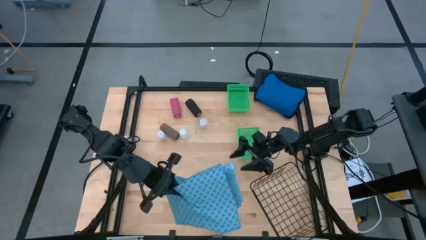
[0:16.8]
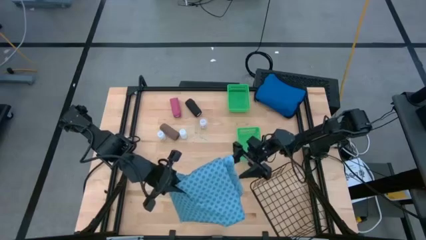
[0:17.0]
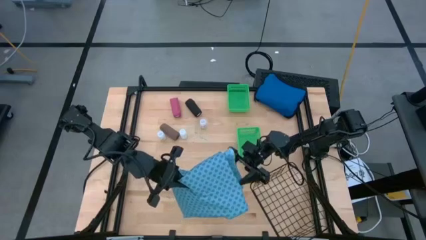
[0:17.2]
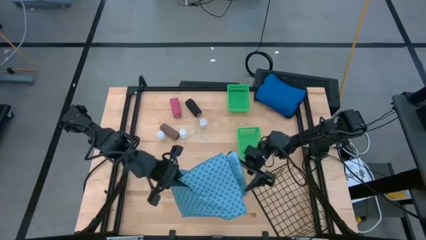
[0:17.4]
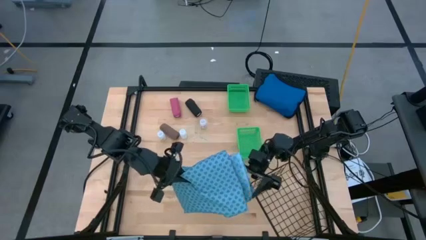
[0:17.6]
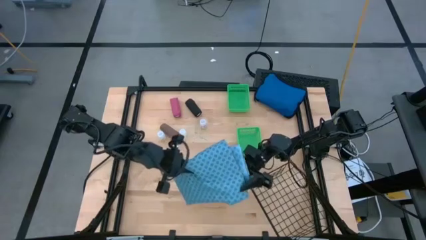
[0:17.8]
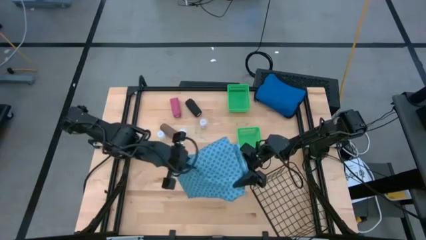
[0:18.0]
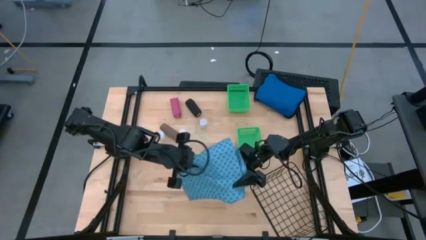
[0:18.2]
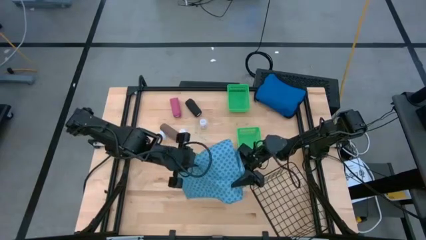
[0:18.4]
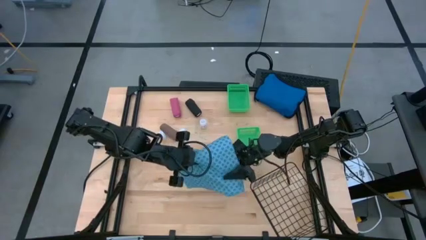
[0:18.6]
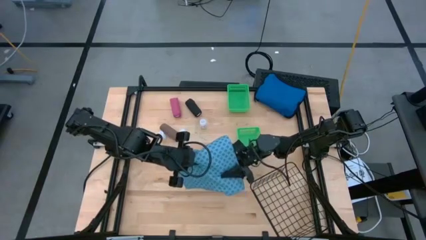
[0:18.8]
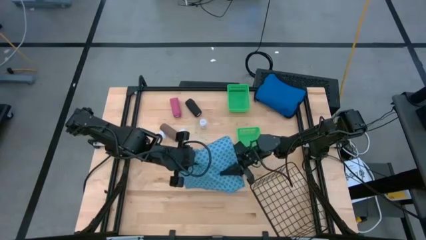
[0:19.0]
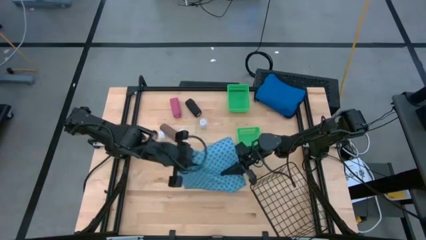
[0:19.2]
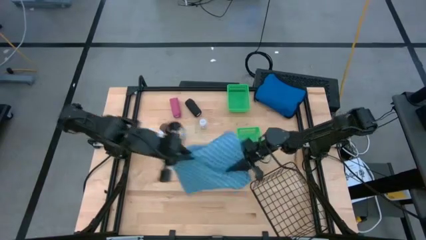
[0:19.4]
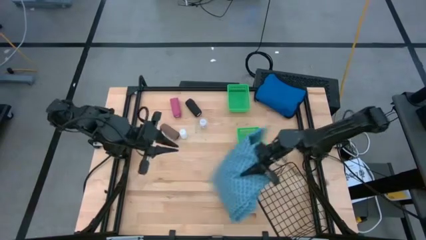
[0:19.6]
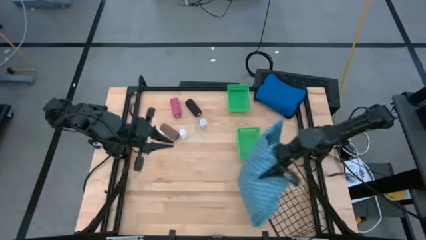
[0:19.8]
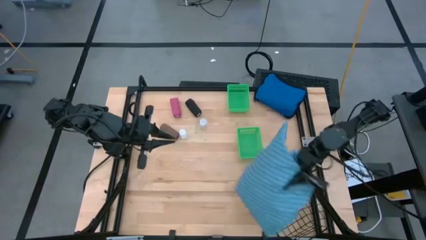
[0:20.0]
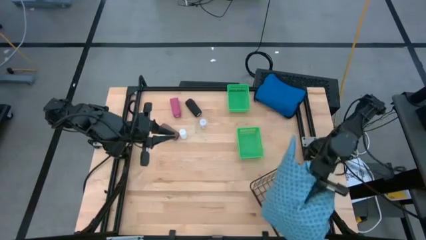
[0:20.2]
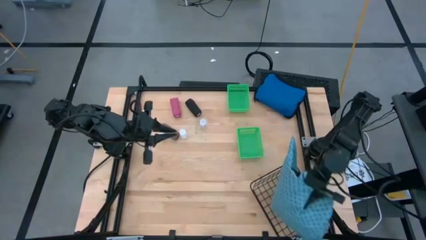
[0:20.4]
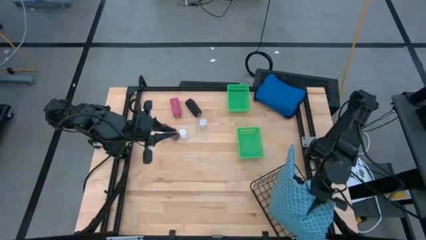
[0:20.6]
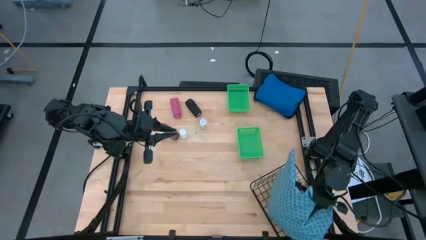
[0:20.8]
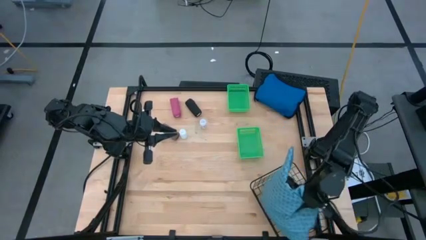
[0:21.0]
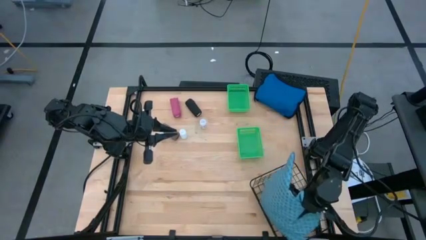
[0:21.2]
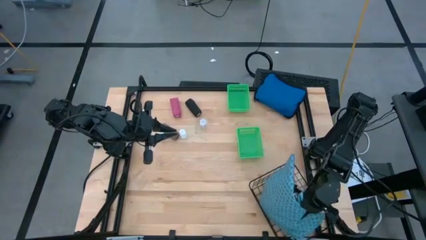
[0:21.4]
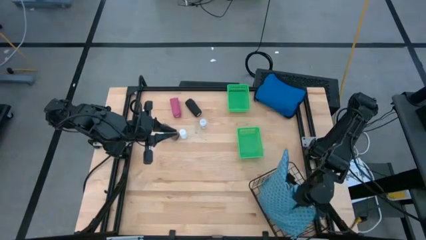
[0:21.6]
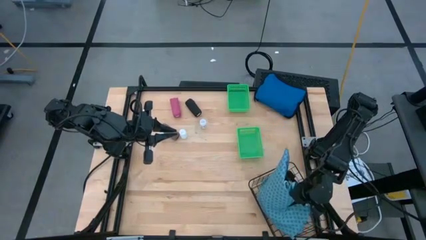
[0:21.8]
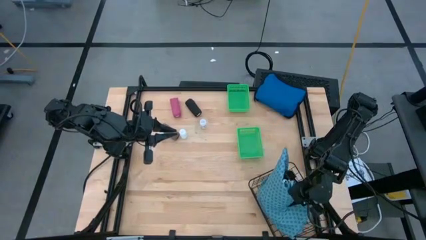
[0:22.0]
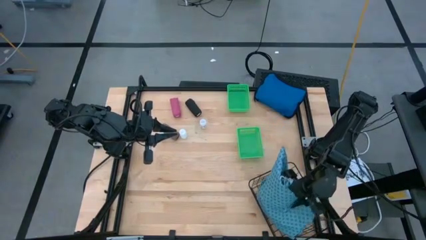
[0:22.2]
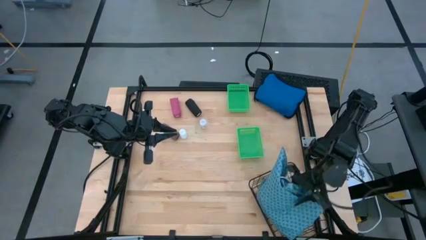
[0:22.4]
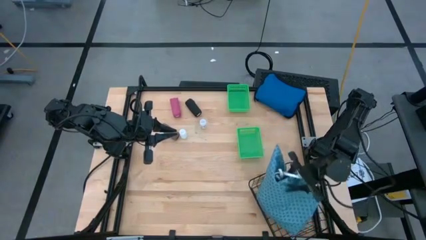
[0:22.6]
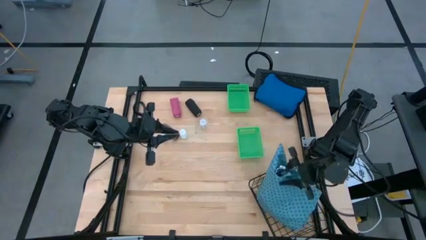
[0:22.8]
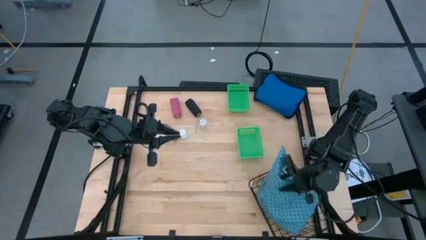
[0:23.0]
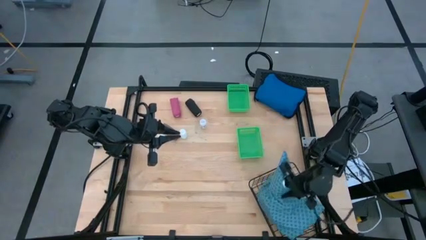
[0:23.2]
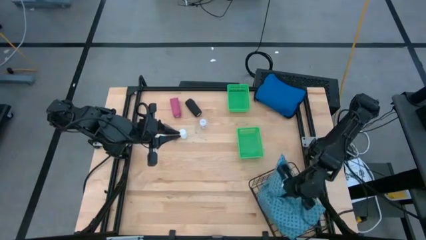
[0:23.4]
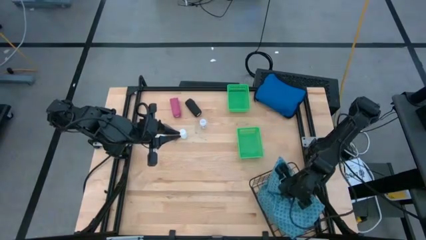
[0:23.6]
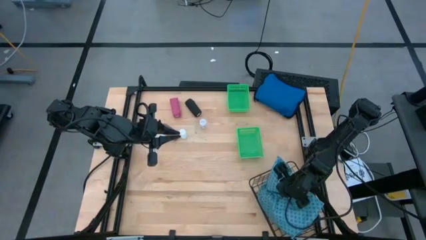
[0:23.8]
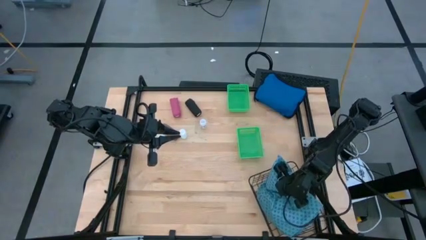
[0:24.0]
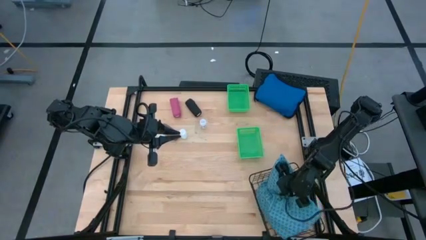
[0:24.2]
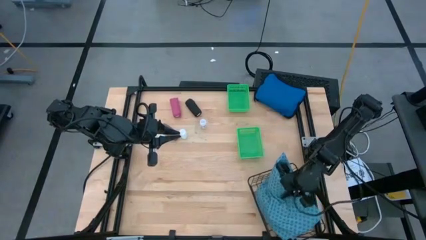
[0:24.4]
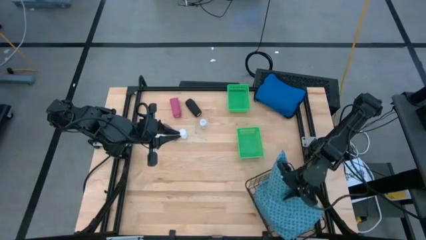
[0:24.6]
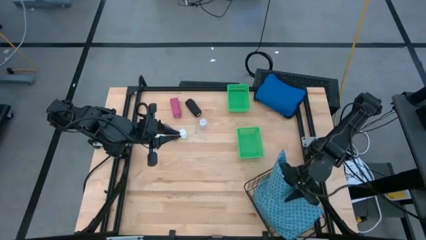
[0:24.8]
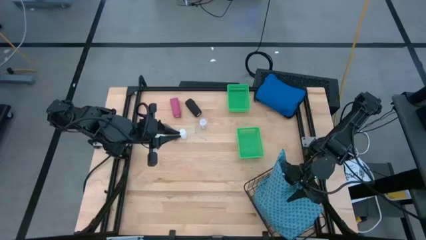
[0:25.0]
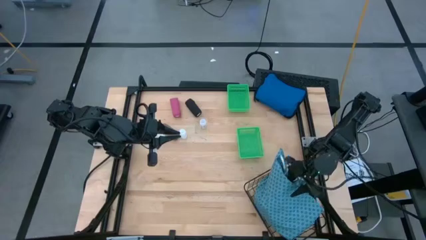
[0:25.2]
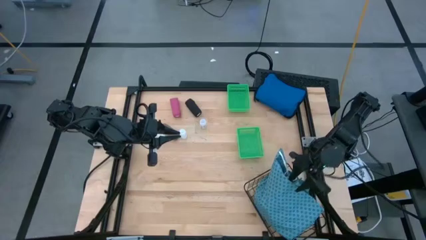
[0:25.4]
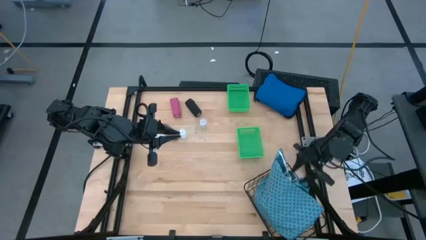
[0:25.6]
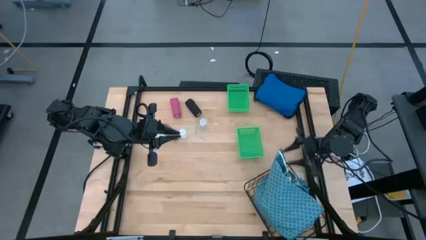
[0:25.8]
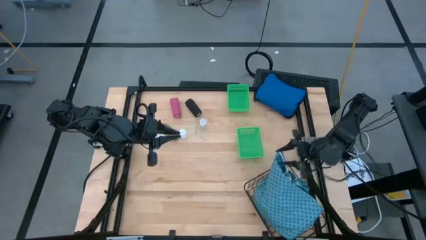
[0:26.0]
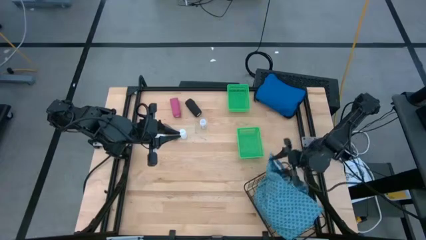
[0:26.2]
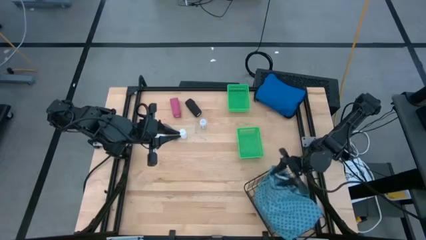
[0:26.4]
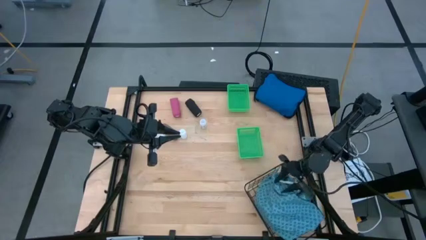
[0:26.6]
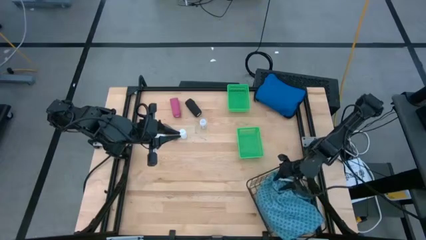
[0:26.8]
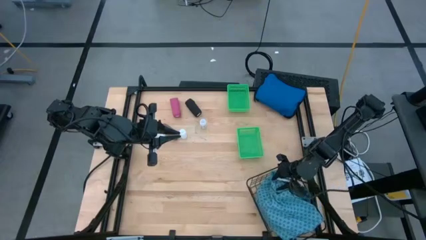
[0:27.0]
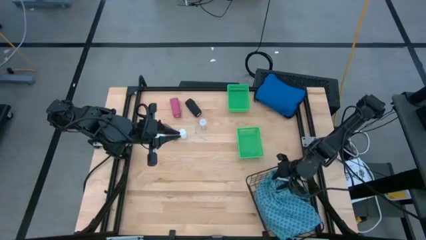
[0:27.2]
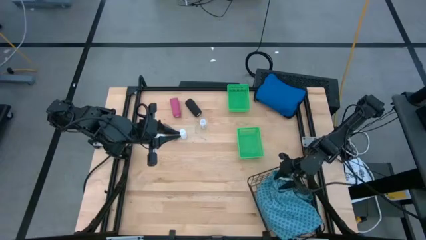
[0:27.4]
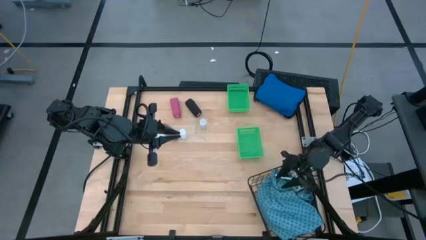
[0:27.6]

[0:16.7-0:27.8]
Task: Pick & Place Medicine items
Put the blue gown into the wire basket
